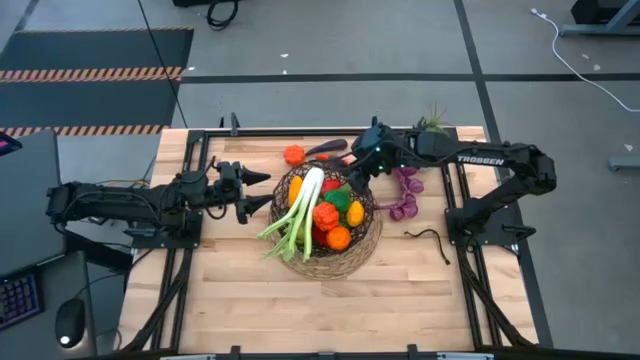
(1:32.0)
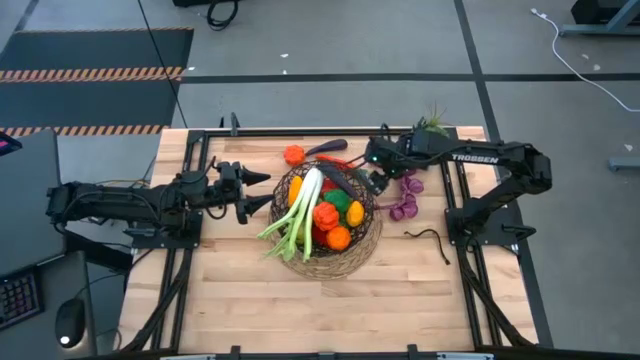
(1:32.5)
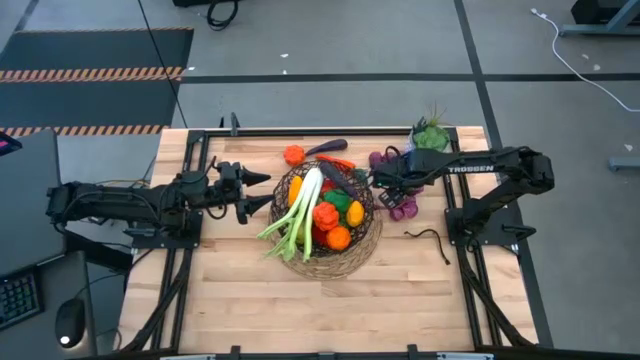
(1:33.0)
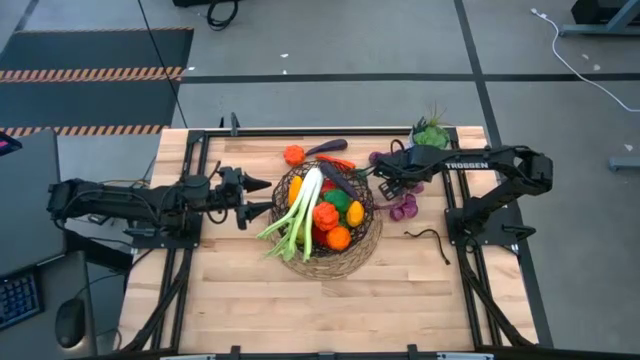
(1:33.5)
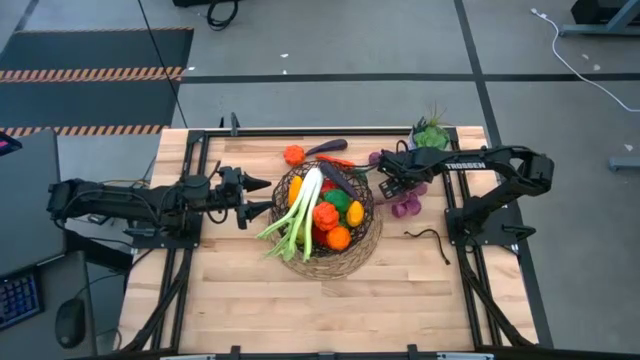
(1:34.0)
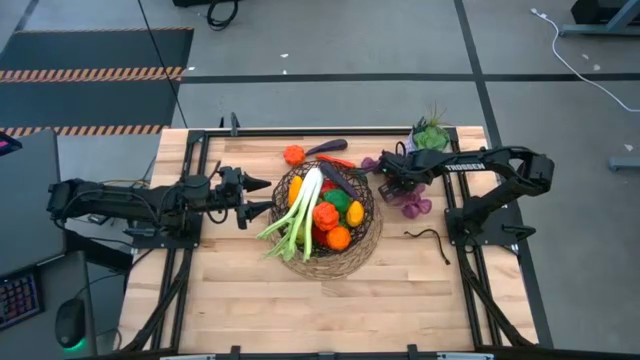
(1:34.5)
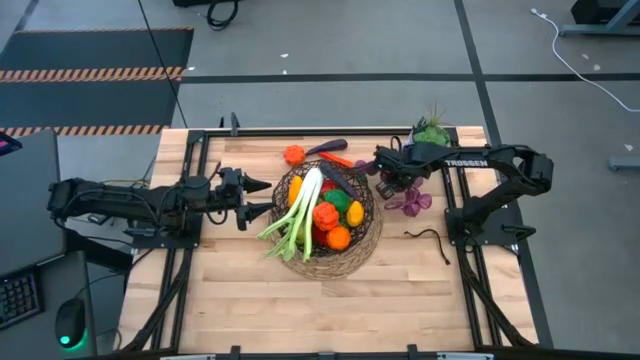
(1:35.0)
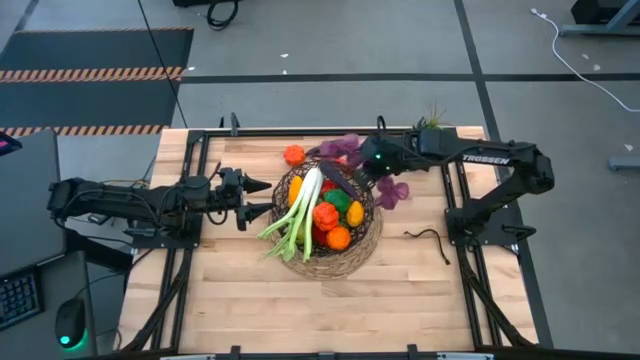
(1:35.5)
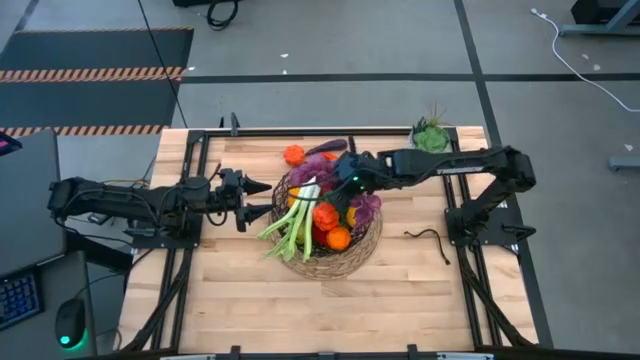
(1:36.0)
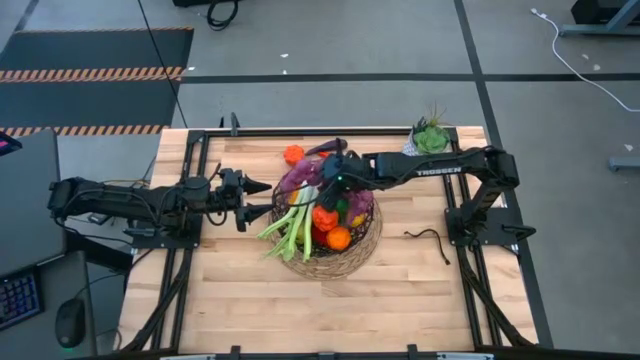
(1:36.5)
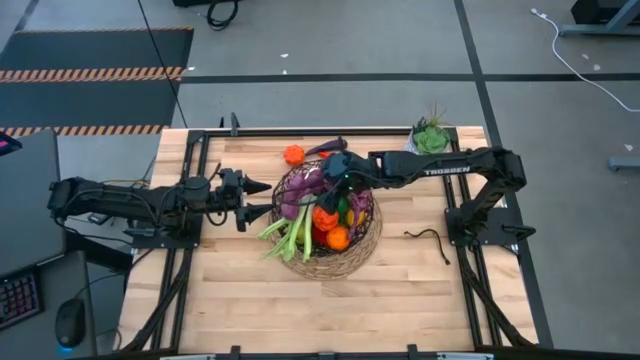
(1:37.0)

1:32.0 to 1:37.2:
Task: Build produce basket
Put the purple garlic into the black basket

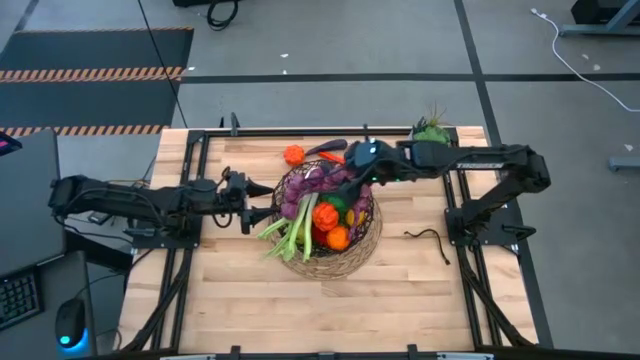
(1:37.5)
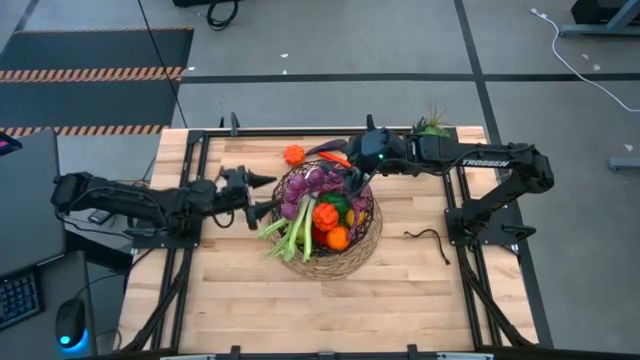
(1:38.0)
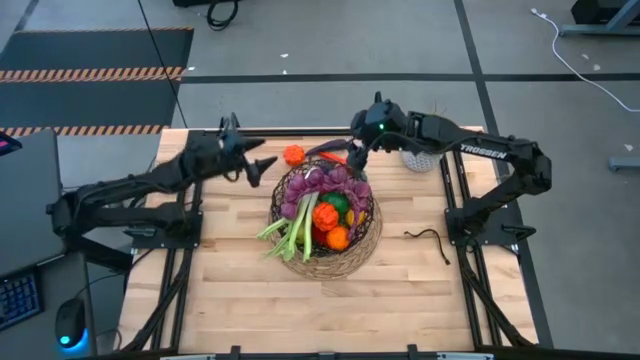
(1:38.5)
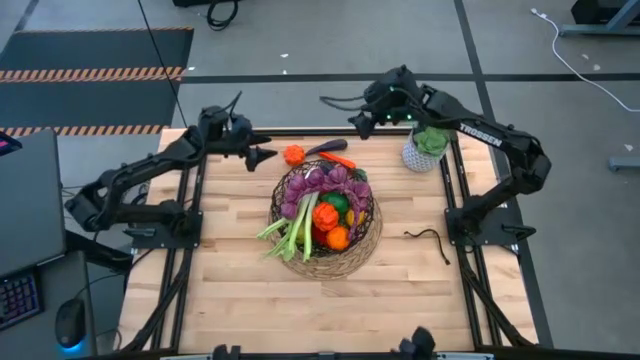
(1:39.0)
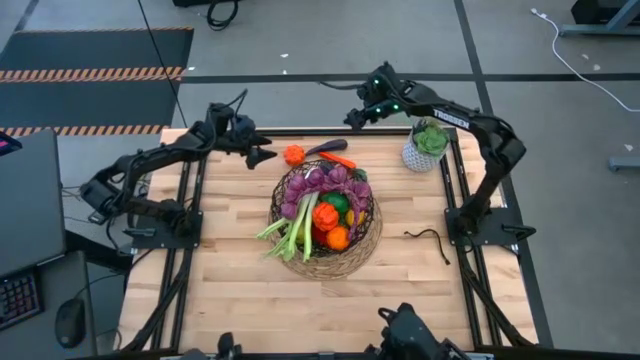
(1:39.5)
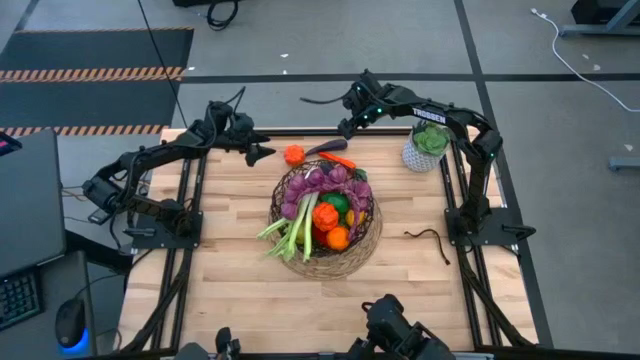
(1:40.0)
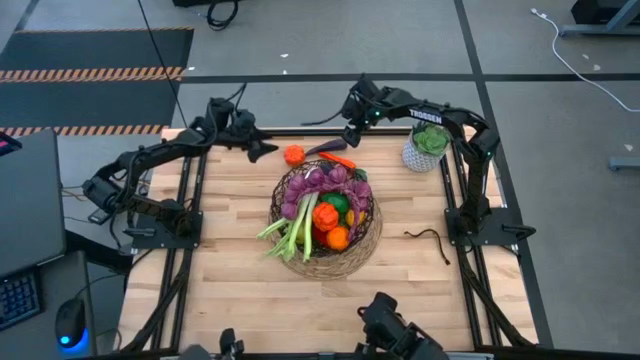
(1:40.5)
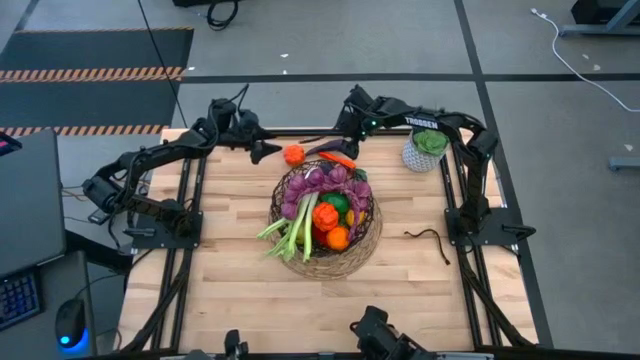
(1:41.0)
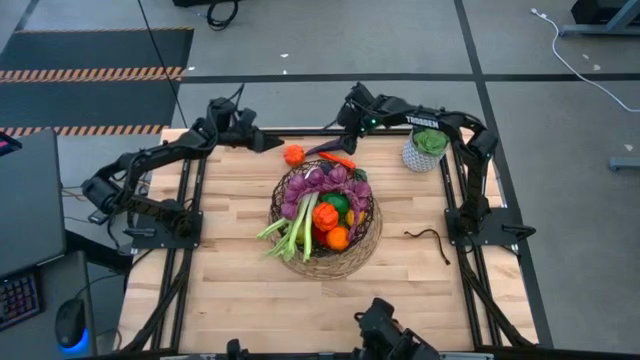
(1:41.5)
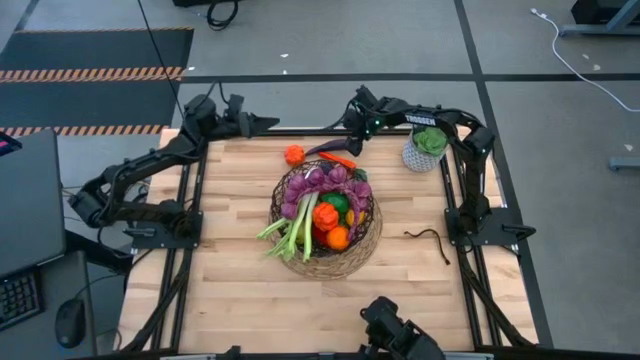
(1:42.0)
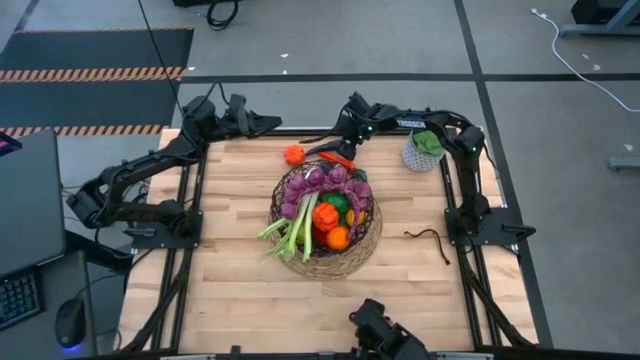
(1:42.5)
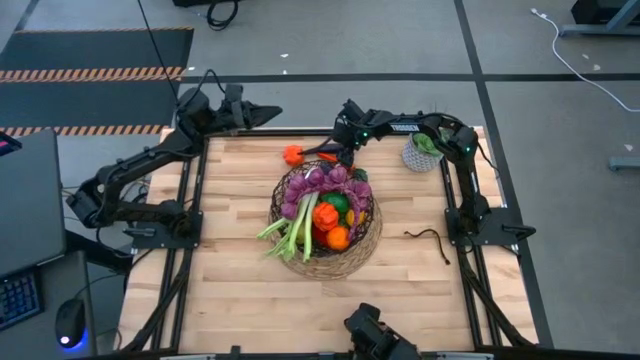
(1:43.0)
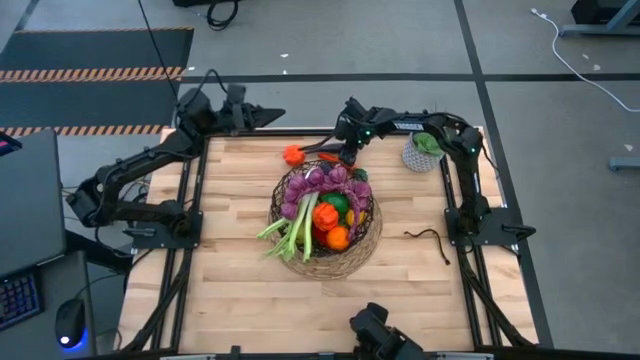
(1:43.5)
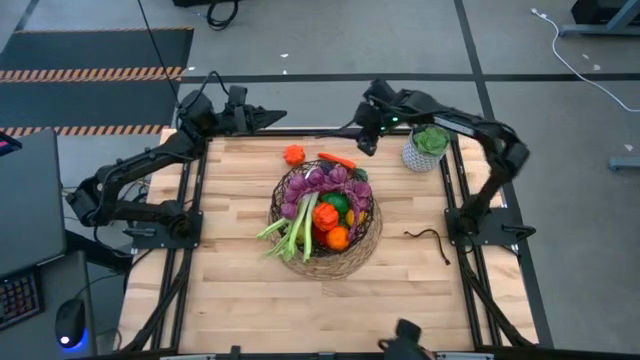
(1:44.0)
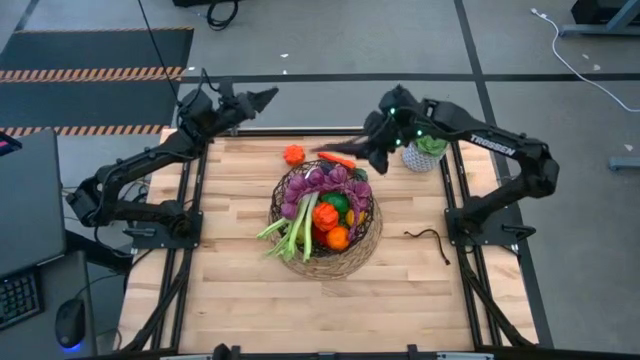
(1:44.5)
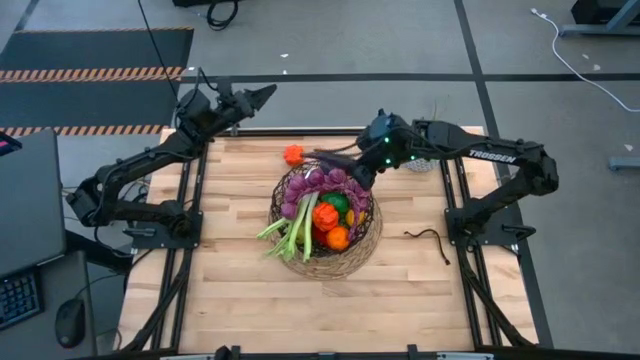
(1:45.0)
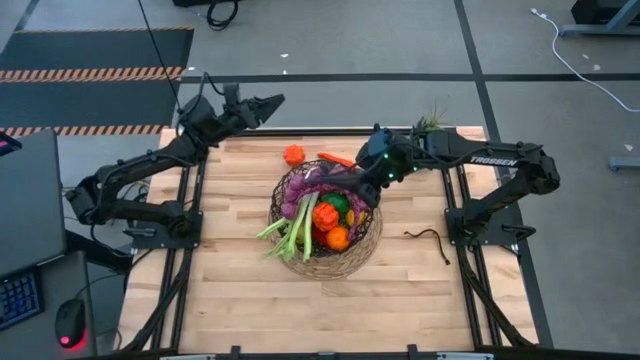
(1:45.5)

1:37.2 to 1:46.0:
Put the purple eggplant into the black basket

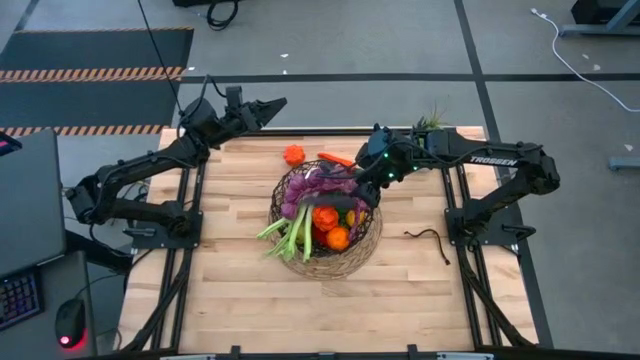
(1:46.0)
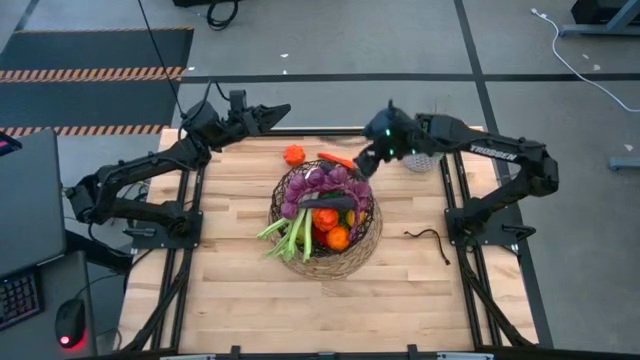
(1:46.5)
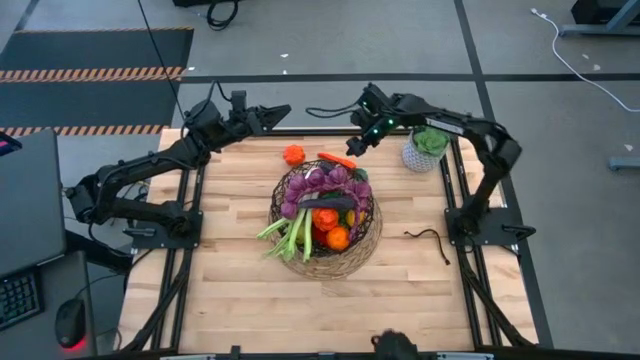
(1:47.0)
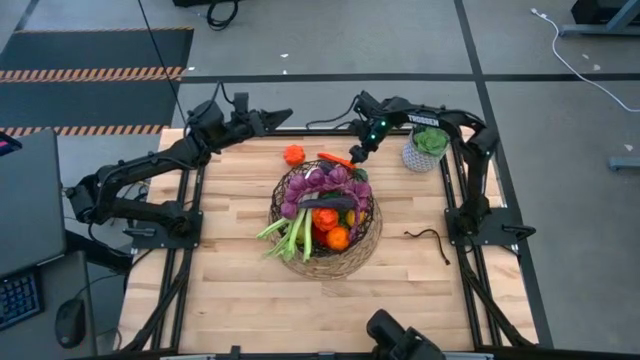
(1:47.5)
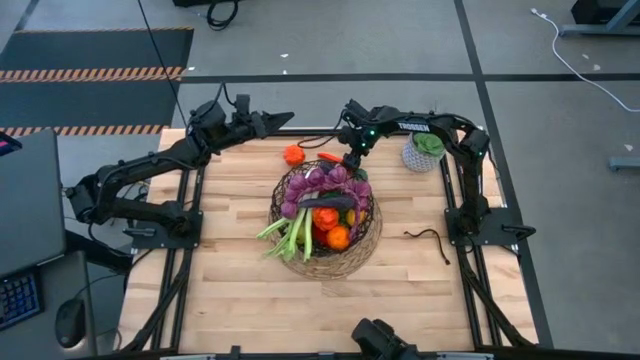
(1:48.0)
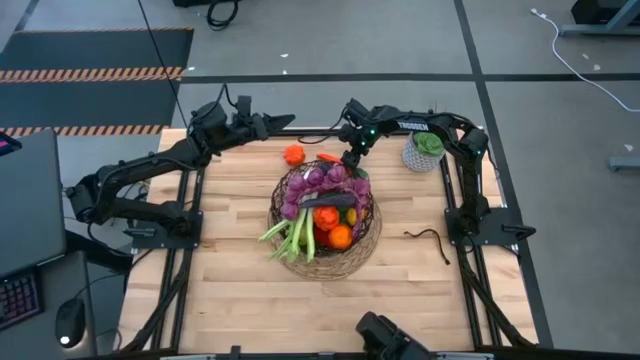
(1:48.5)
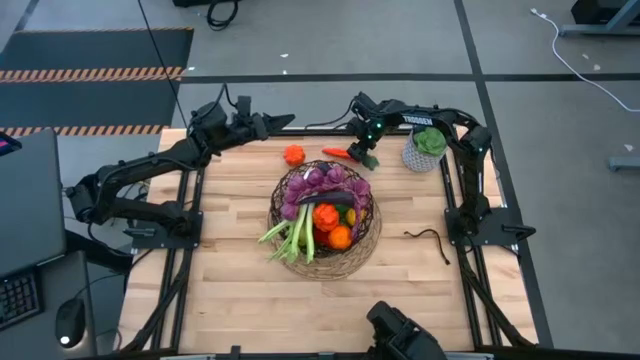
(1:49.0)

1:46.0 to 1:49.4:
Put the orange carrot into the black basket

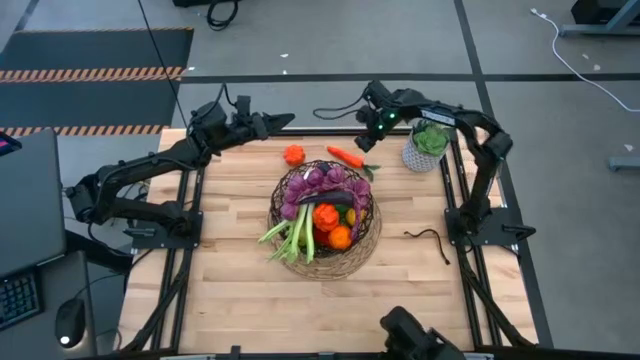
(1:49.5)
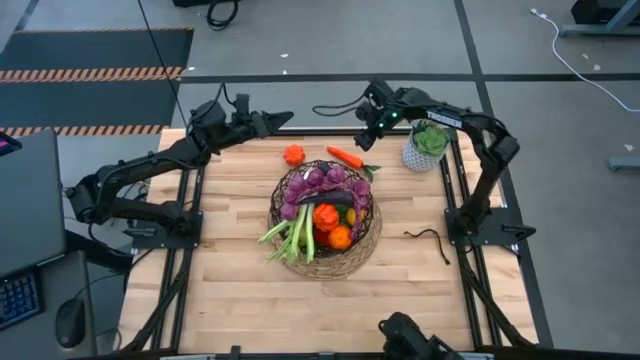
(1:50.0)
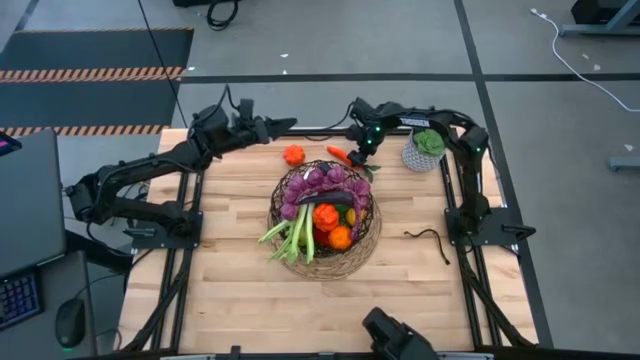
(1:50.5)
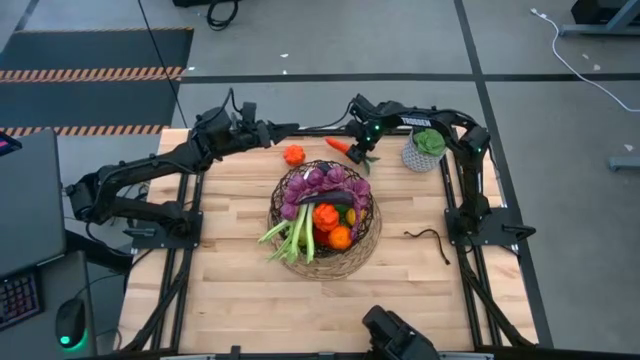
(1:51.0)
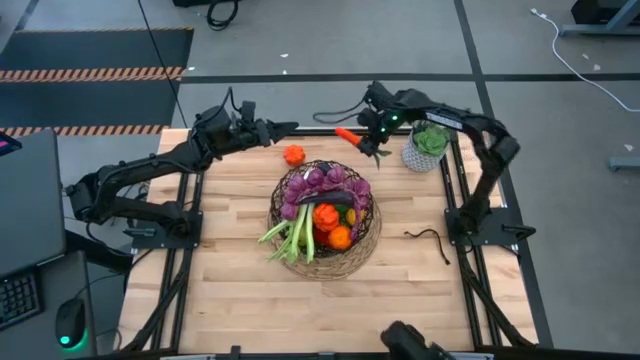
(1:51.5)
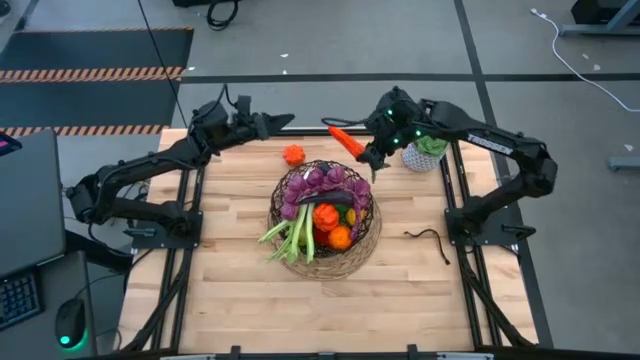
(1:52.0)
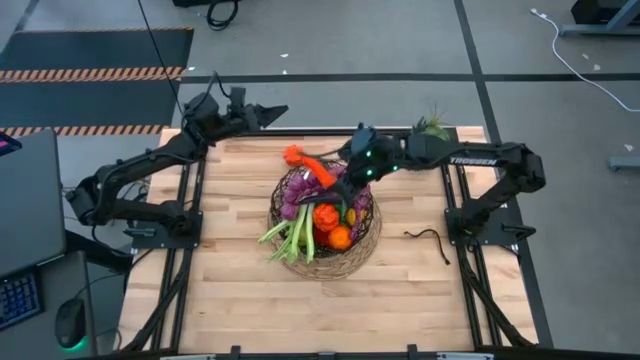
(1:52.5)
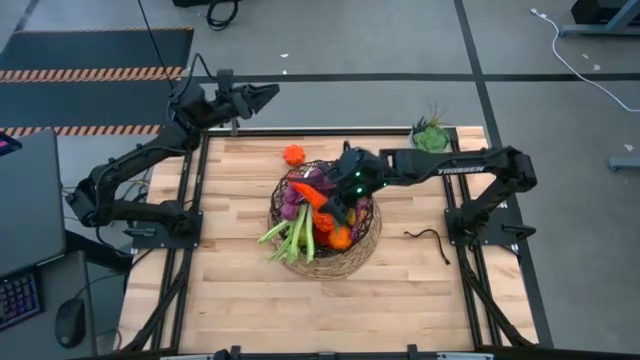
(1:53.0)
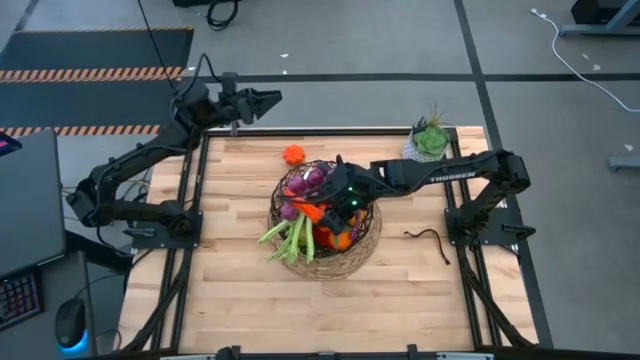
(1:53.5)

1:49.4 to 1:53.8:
Put the orange carrot into the black basket
